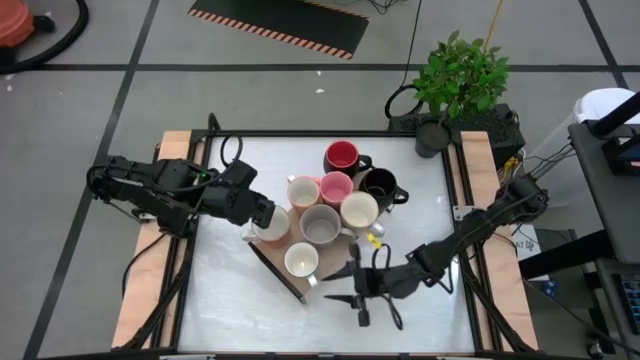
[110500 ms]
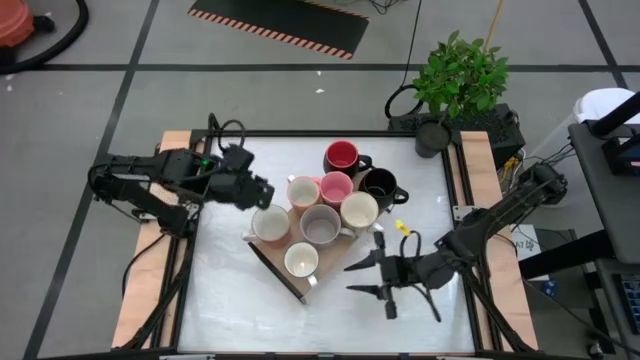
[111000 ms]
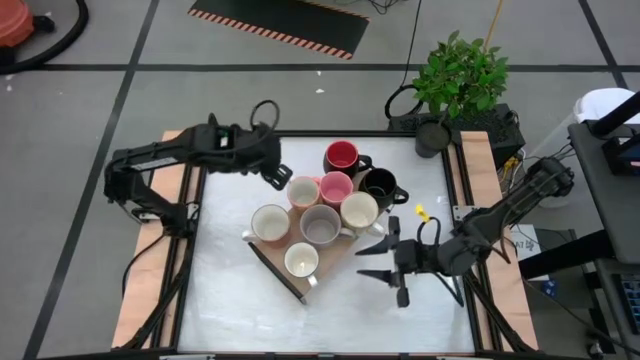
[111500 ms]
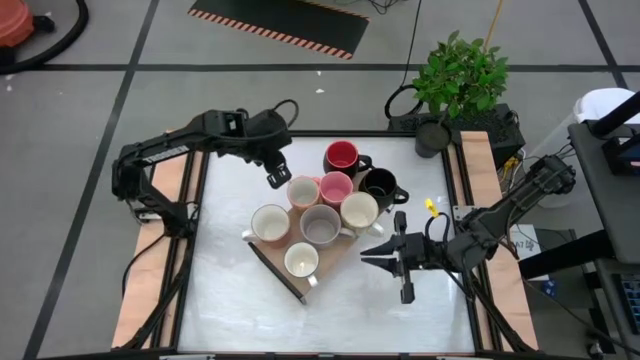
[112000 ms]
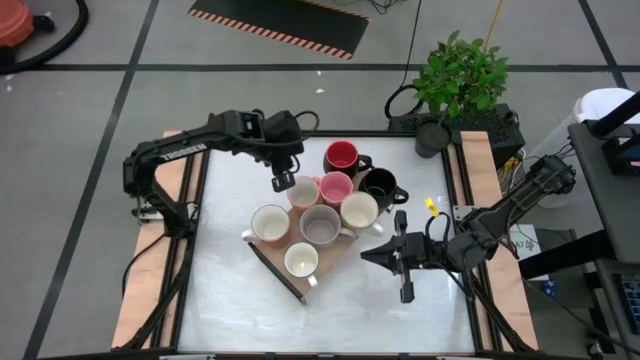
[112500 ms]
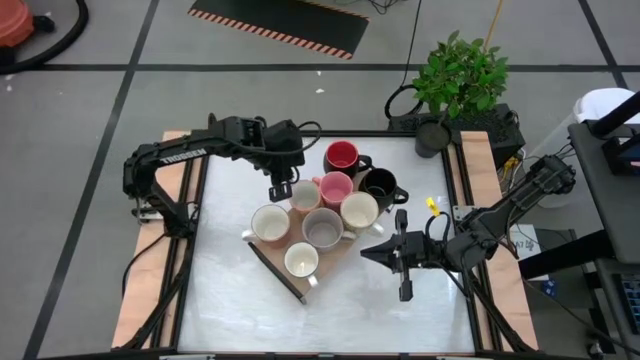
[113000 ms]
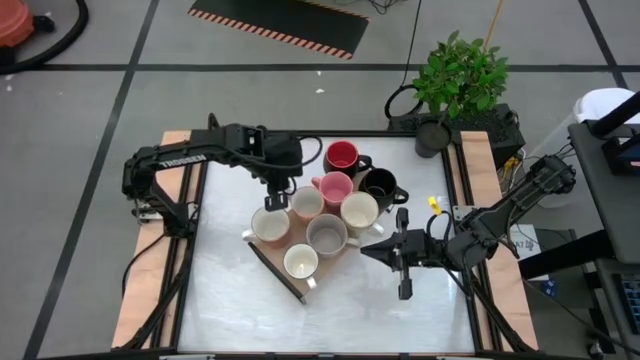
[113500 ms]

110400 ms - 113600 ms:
Task: Place coffee mugs
Adjust the orange mug on top of the shelf

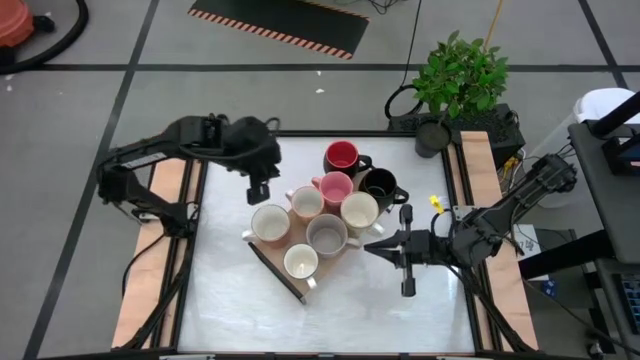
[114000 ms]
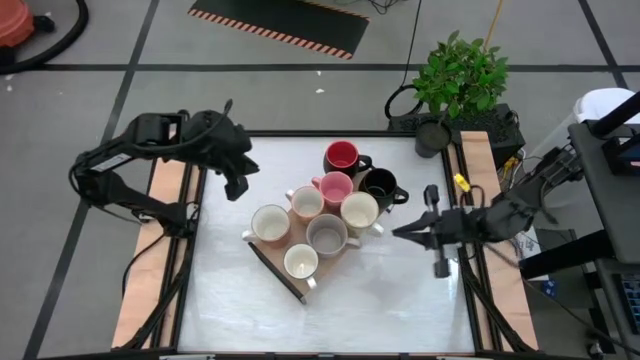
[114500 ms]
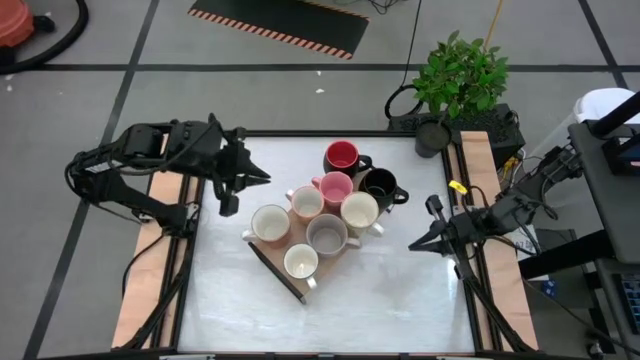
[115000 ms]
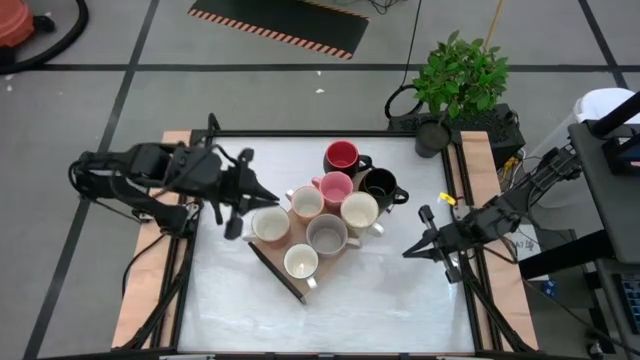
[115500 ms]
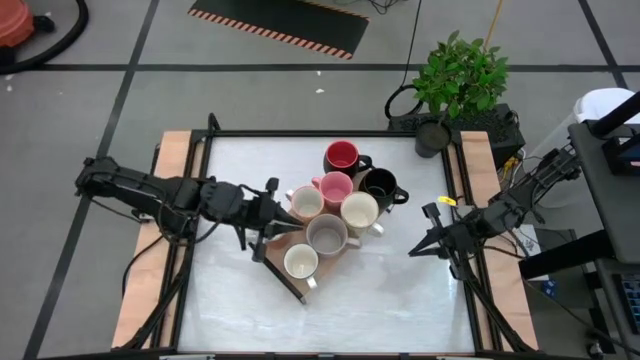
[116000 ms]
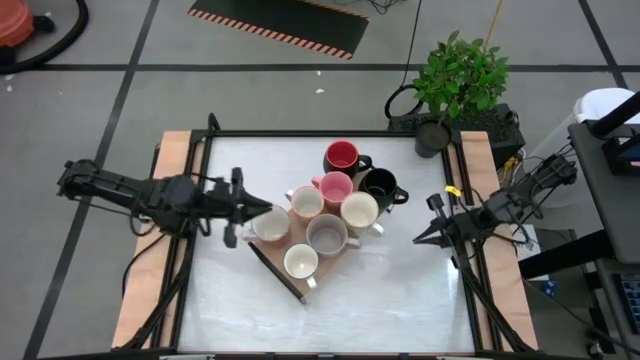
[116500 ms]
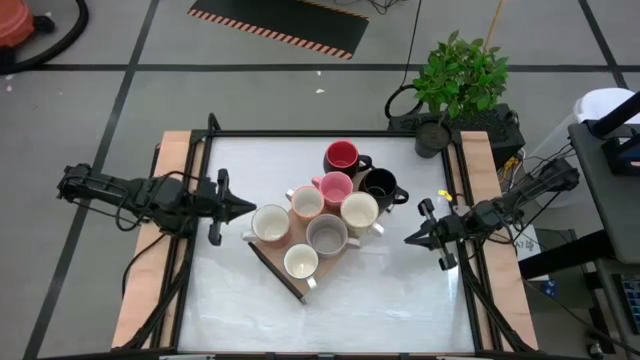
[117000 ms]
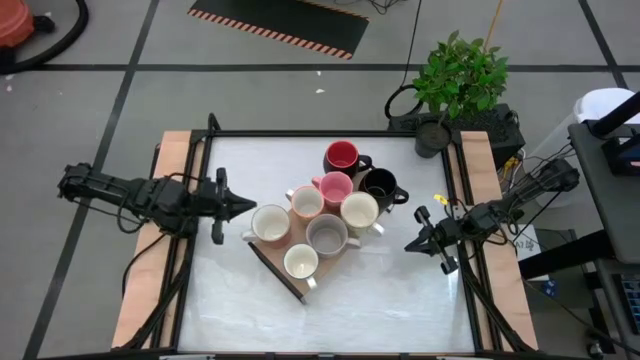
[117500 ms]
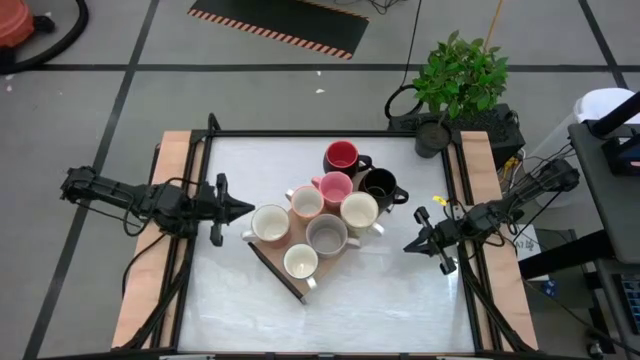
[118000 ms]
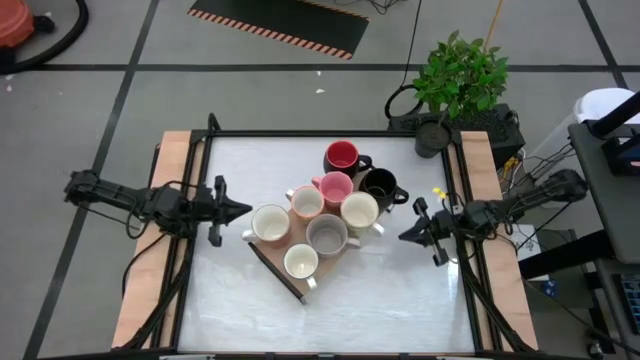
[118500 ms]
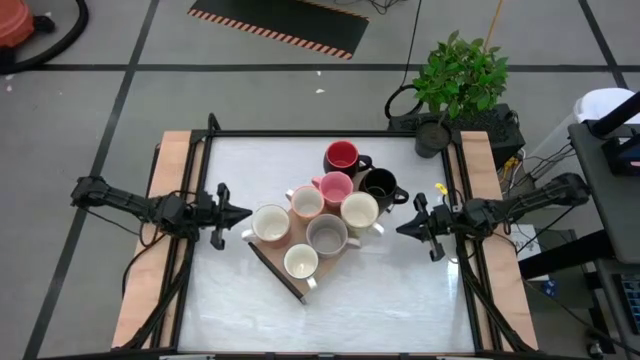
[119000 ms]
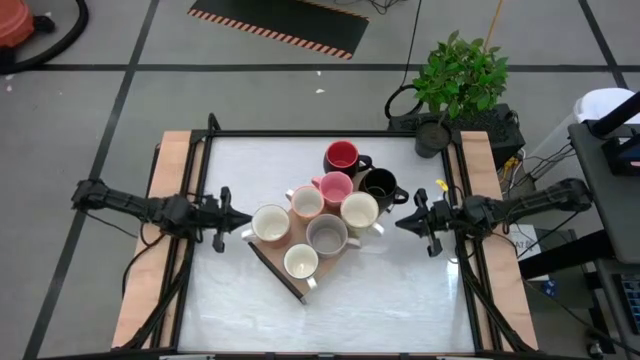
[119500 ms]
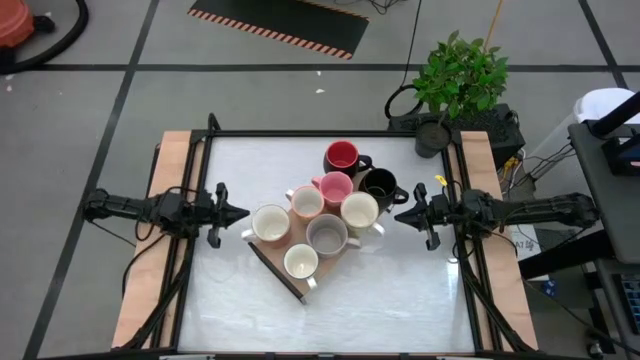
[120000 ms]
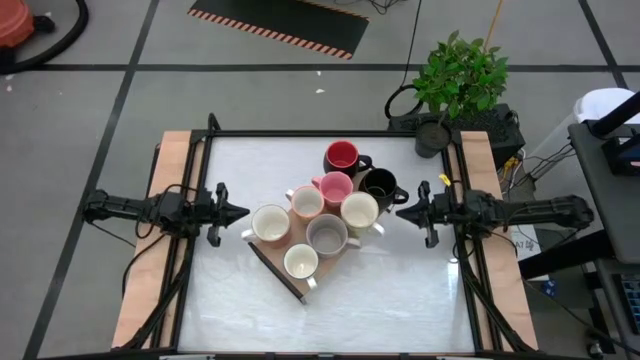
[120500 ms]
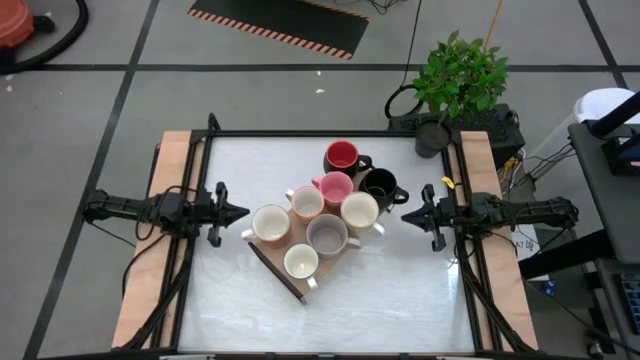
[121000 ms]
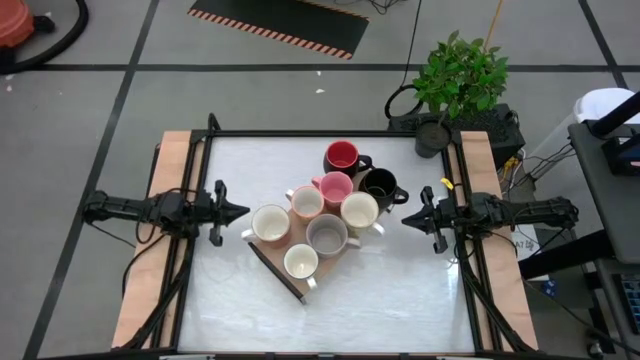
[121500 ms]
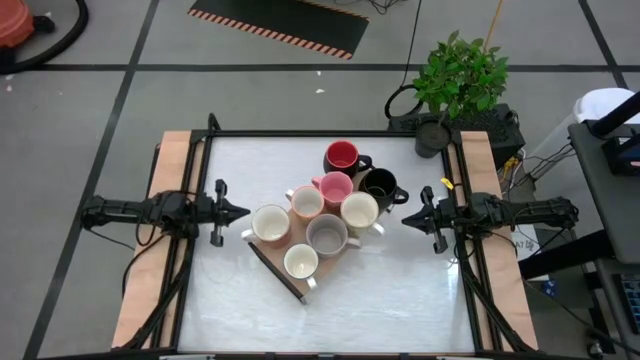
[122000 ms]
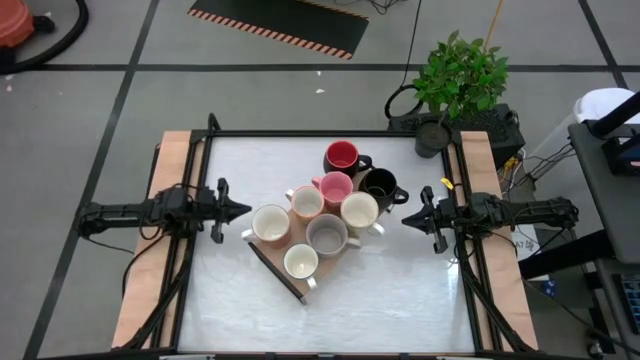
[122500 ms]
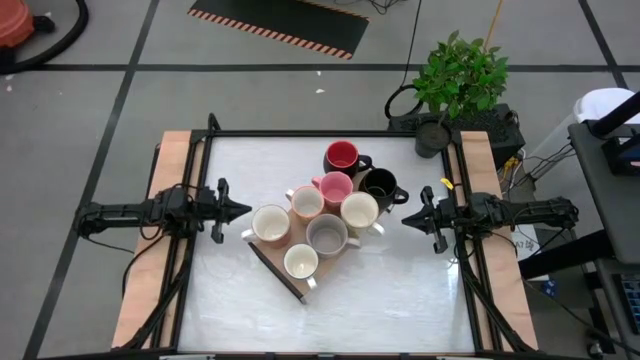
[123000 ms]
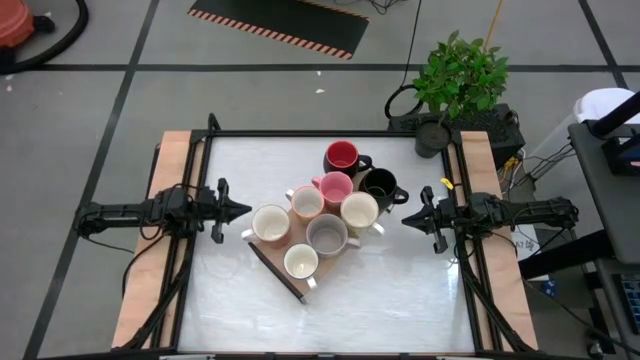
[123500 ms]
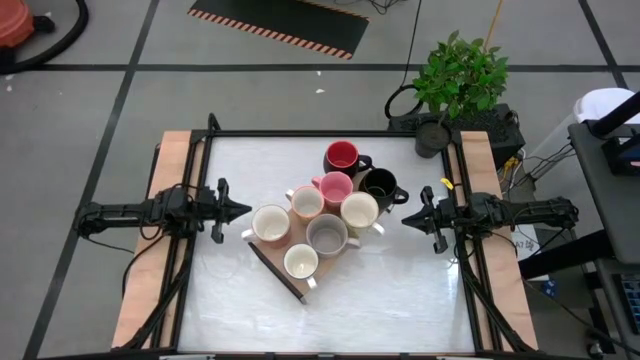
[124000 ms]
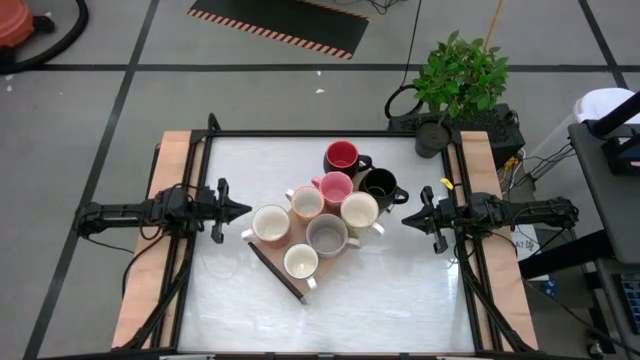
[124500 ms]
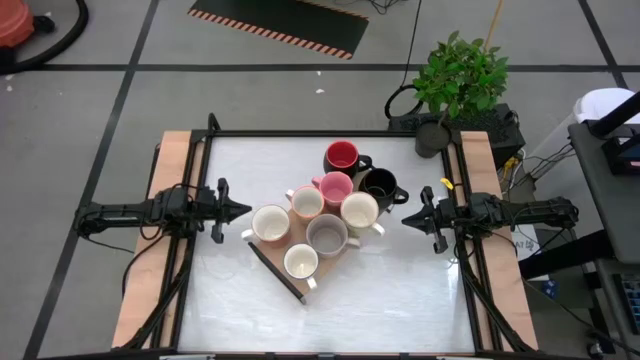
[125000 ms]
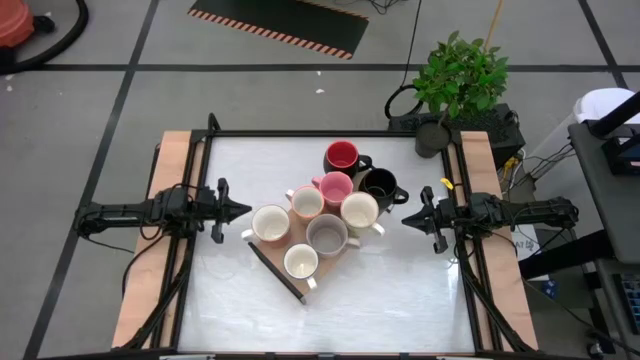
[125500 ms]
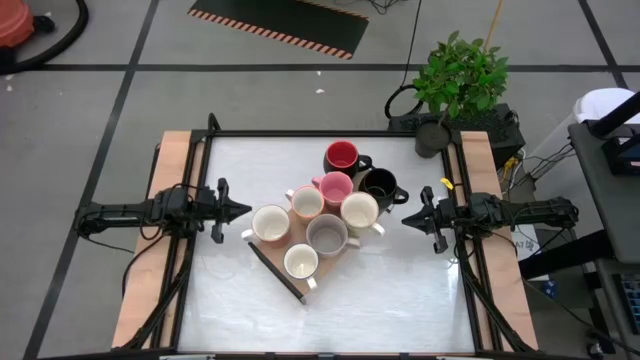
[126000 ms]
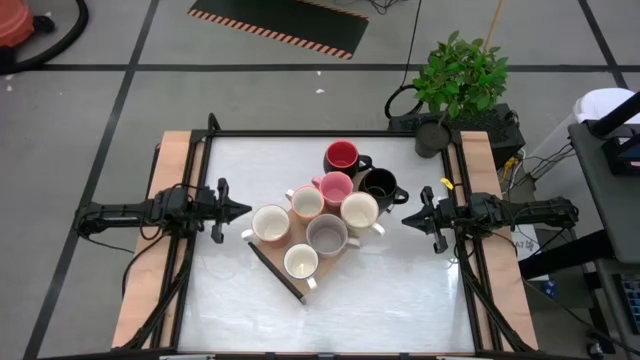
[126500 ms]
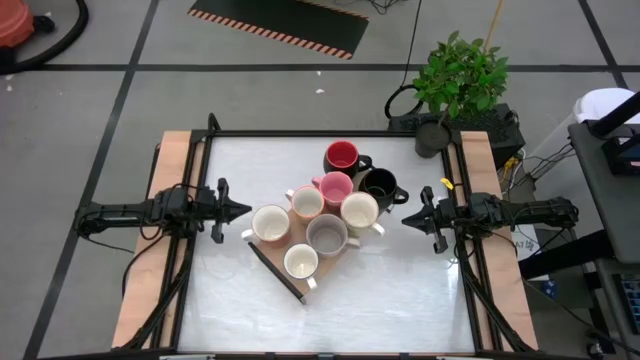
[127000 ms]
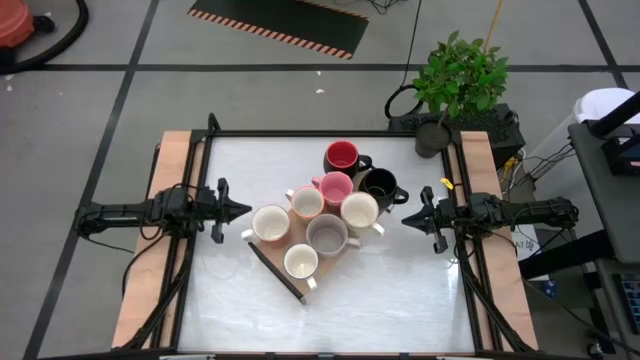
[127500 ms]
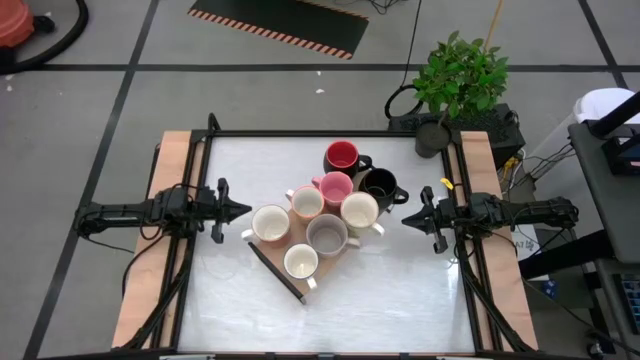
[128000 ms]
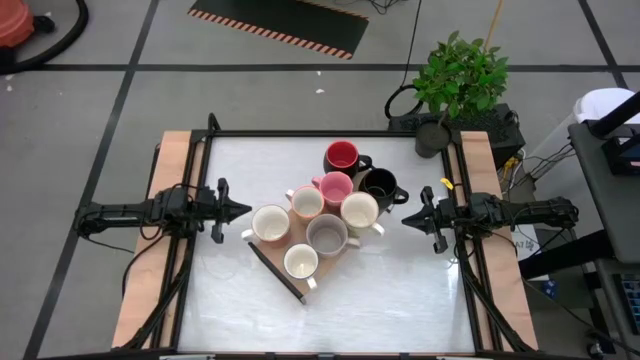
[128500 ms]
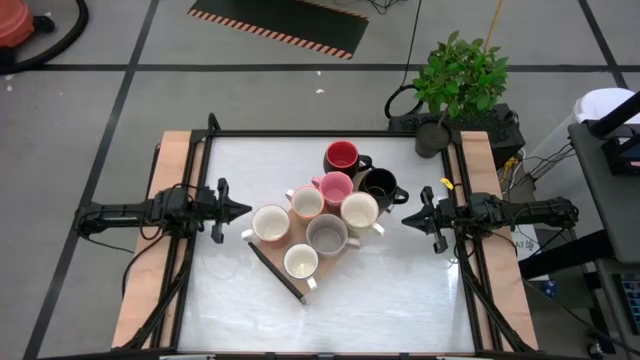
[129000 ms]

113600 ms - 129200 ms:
Return to Home Position

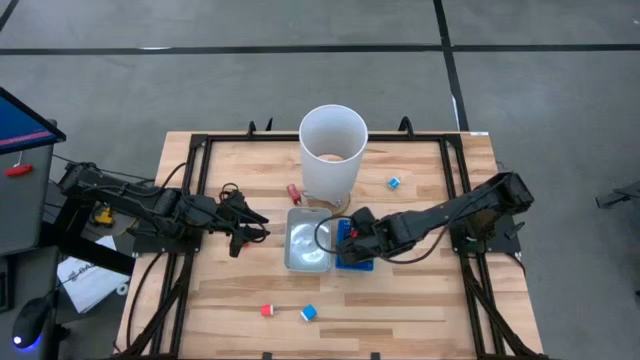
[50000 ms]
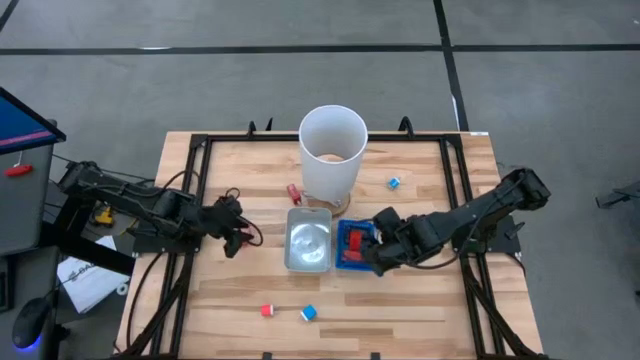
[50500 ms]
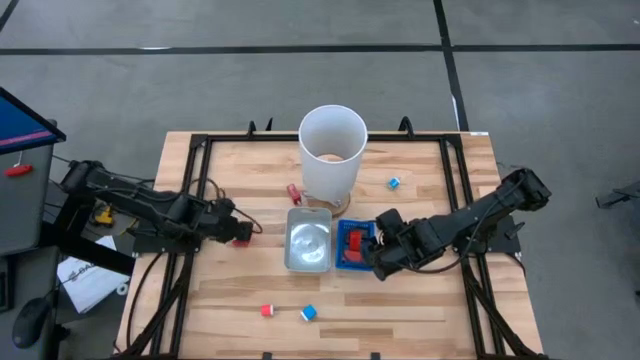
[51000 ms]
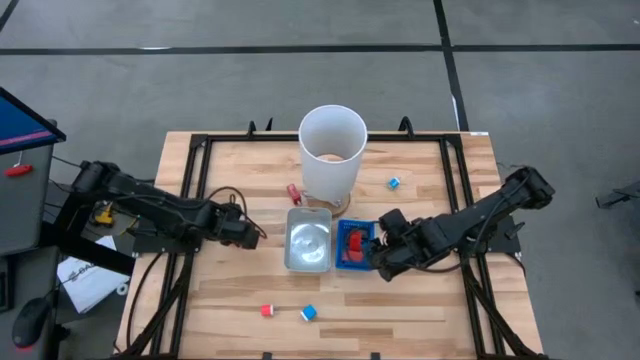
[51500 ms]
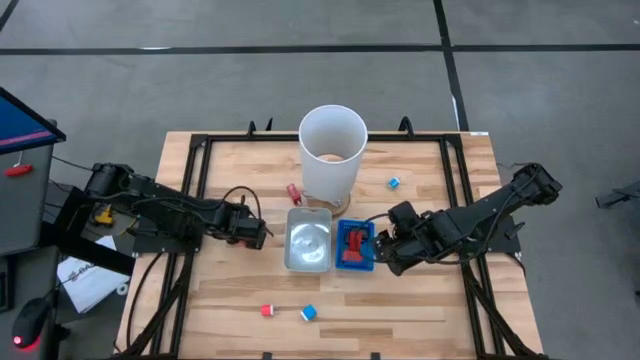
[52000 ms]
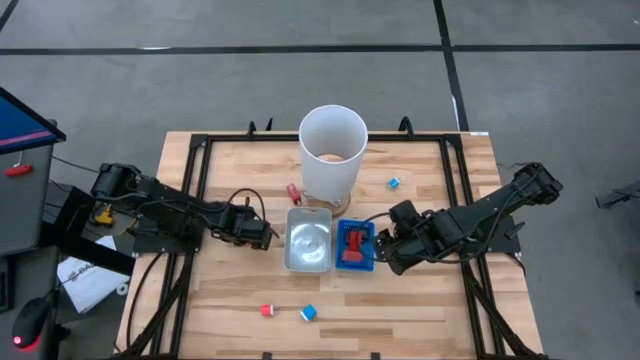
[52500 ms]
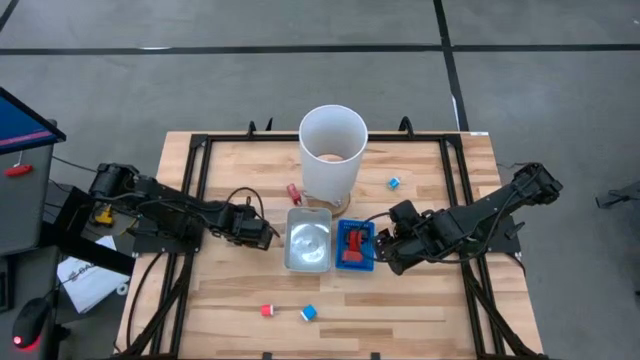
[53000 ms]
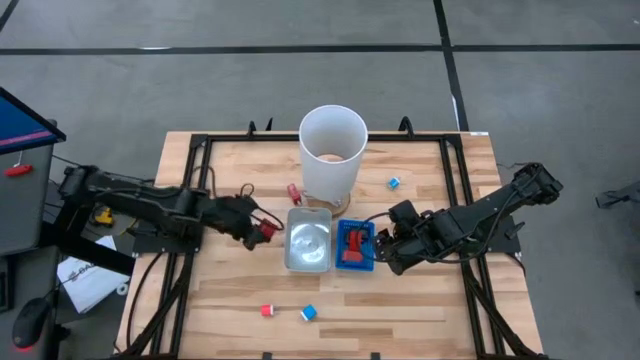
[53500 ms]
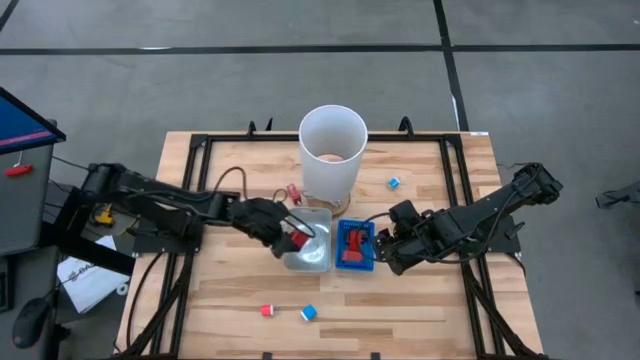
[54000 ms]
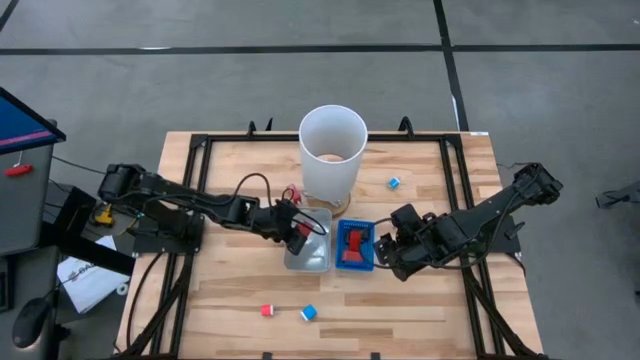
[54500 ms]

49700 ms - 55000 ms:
Task: Pick & Place Office items
Put the bottom red charger adapter into the gray bin
